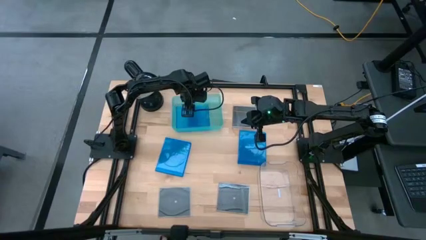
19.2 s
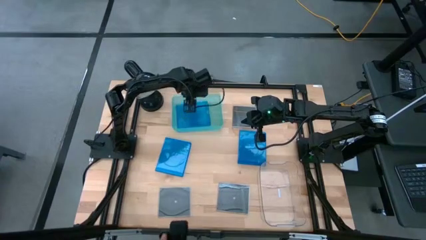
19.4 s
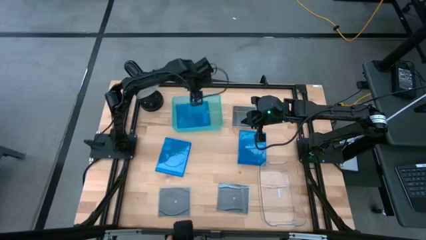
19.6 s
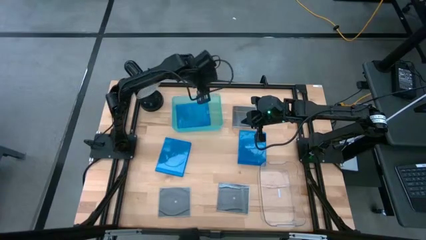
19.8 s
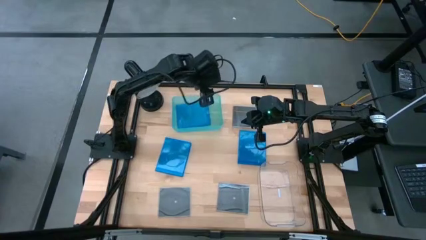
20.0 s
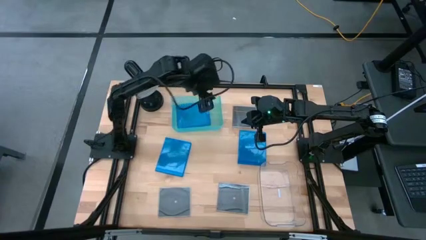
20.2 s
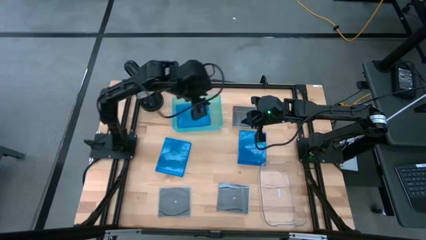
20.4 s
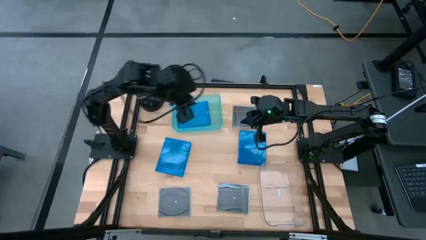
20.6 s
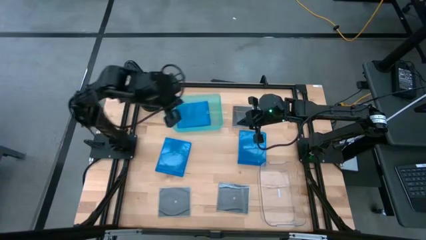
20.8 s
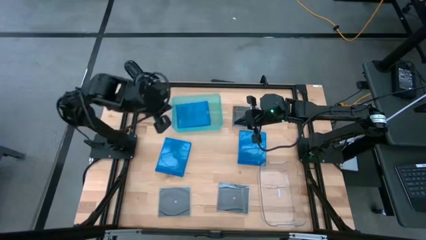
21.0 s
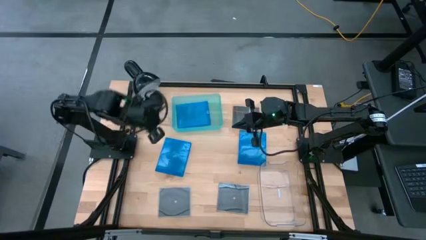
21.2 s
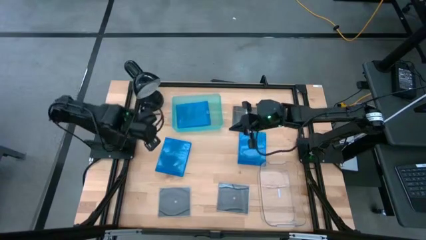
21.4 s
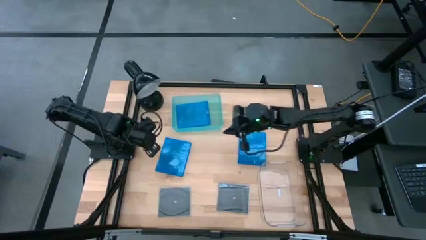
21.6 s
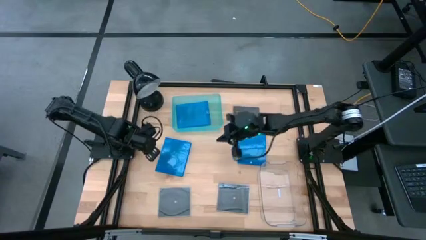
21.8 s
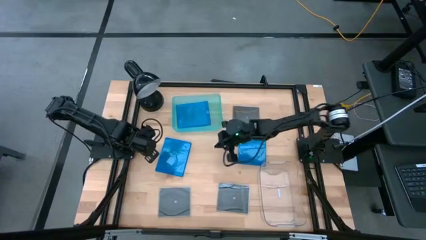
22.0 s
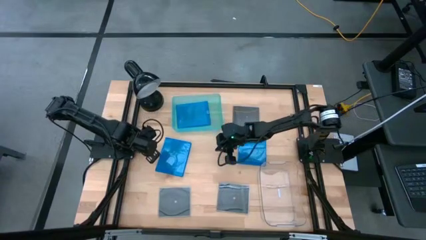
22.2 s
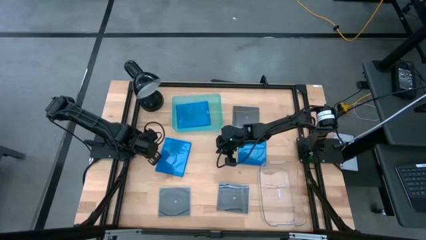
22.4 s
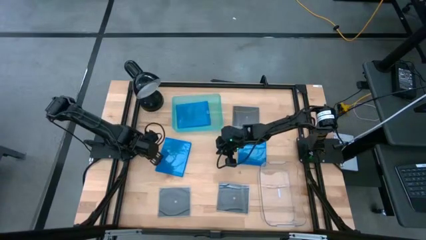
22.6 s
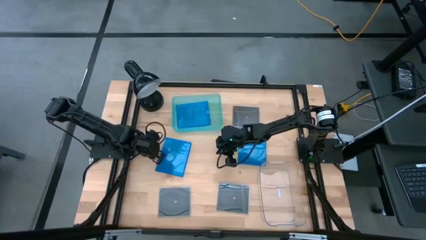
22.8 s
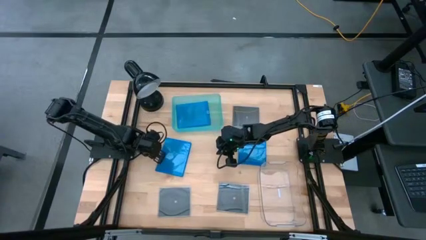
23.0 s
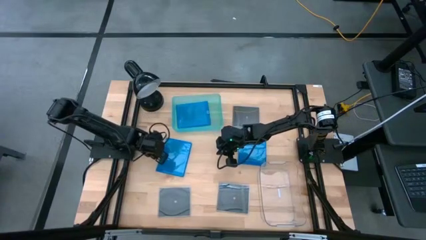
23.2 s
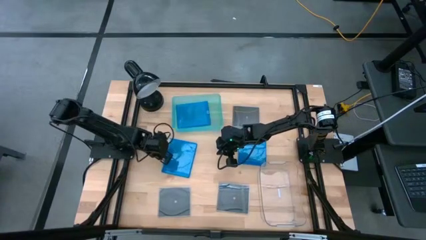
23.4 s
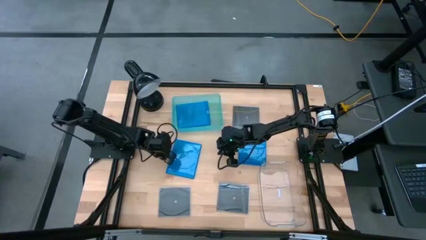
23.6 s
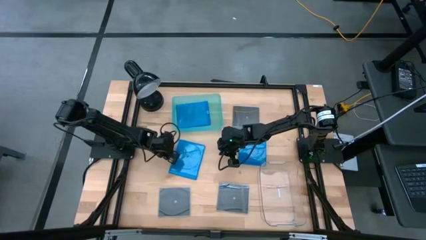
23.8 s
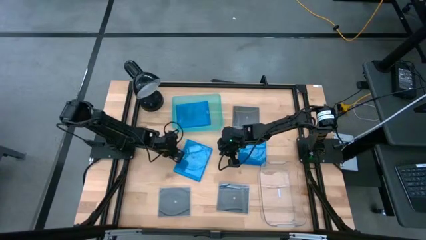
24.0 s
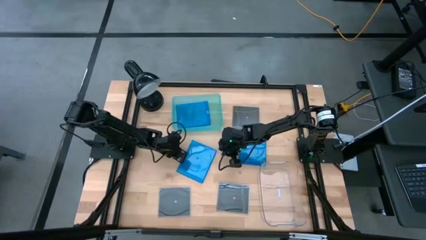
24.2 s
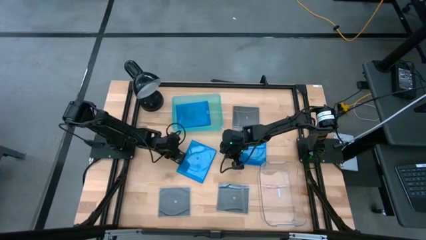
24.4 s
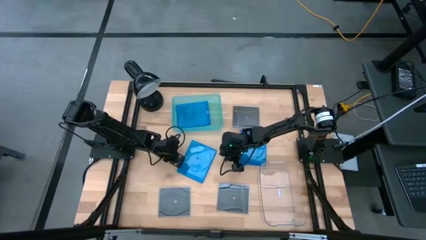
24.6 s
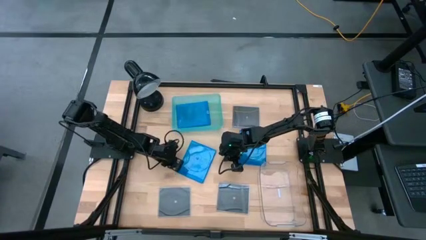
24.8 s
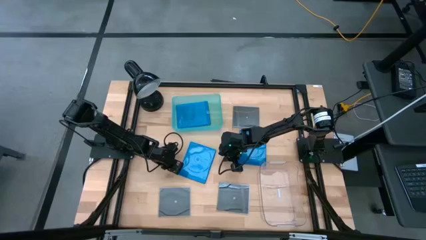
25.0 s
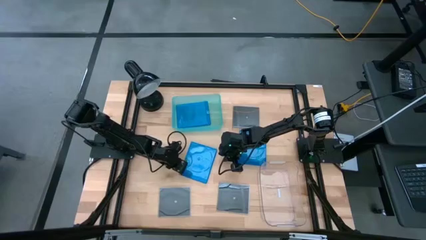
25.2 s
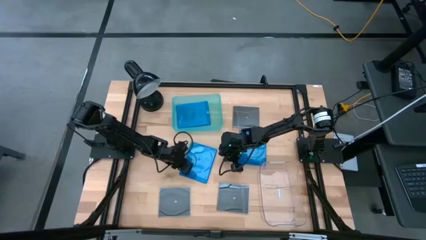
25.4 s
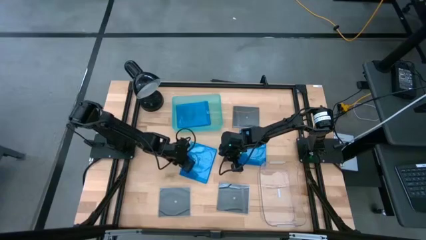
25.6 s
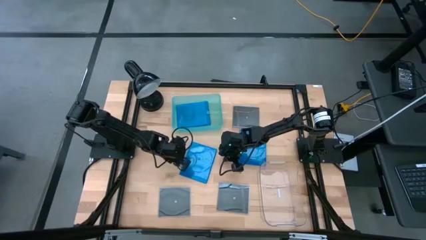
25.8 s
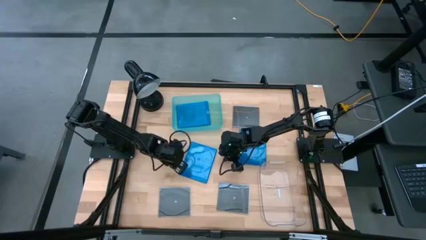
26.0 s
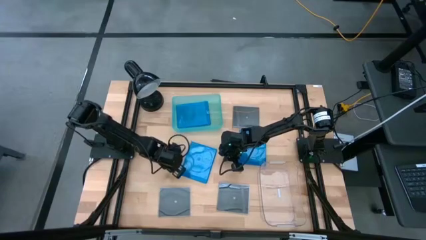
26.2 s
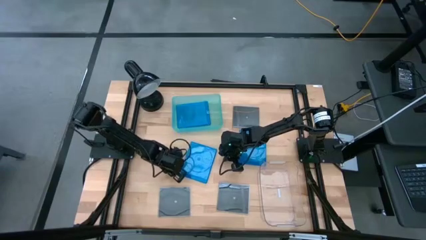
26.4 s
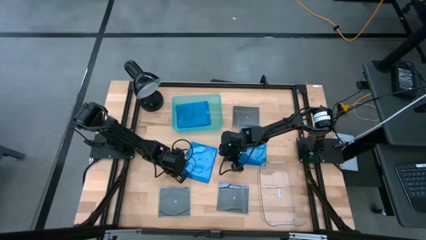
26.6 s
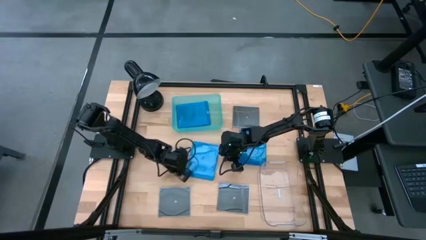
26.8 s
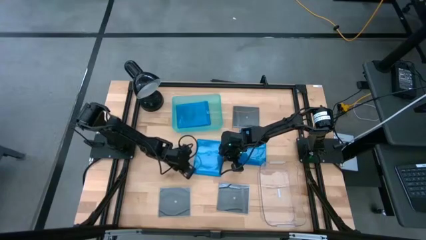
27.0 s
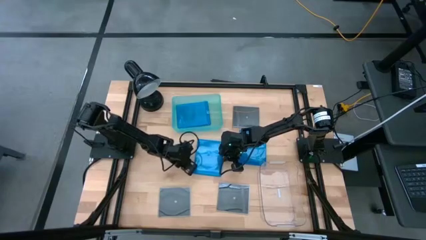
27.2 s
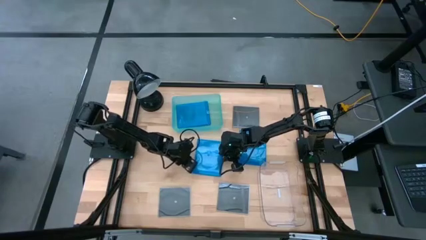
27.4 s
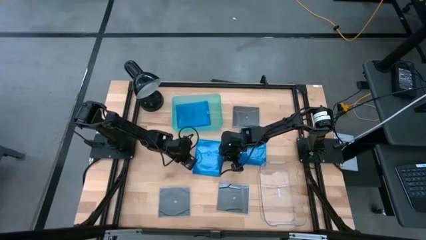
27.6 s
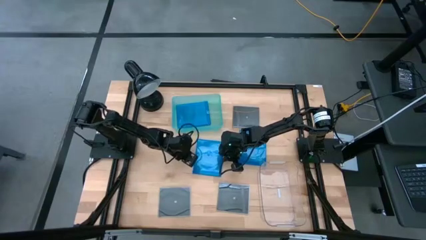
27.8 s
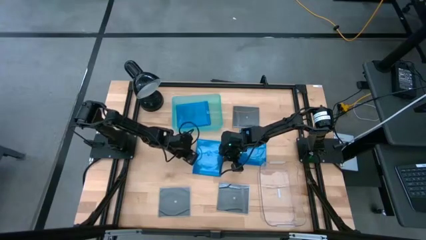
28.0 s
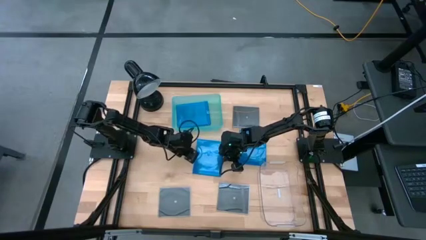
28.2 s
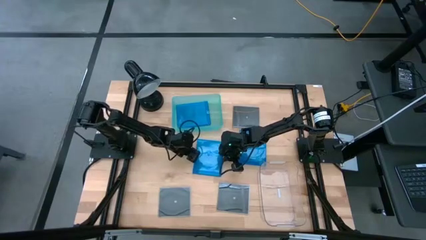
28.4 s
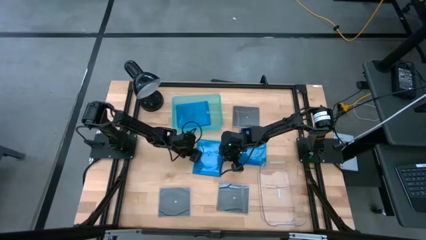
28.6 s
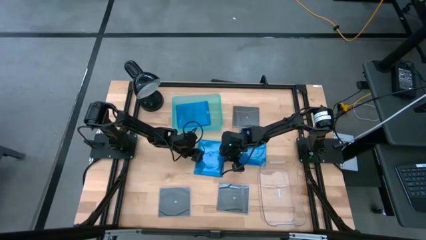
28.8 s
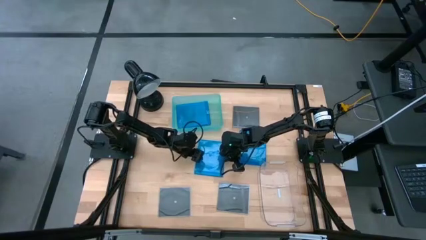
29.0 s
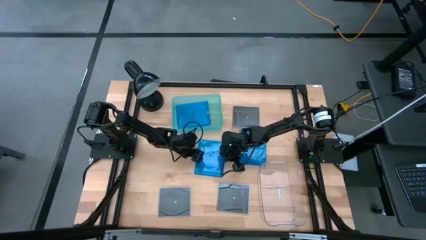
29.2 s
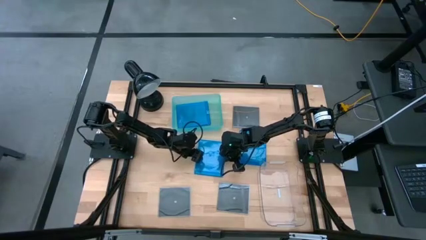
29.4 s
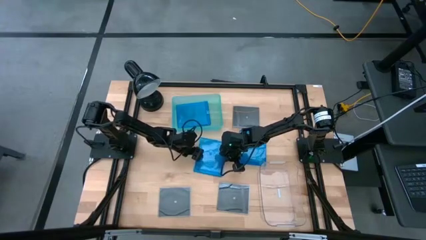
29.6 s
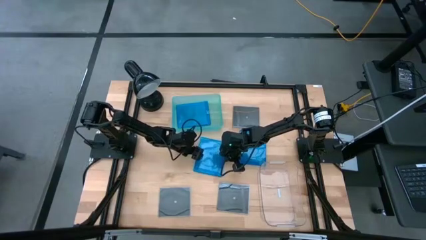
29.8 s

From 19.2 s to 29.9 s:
Task: Pick & place jewel cases by type
Put the left blue CD case into the green bin

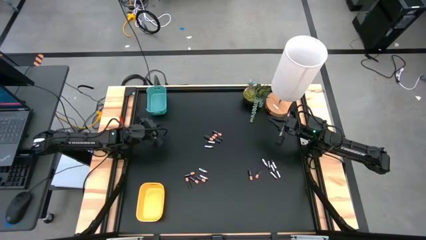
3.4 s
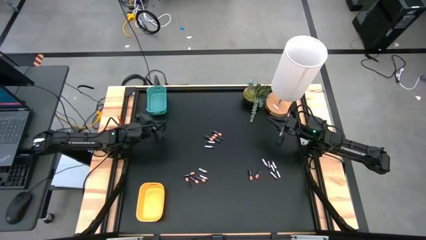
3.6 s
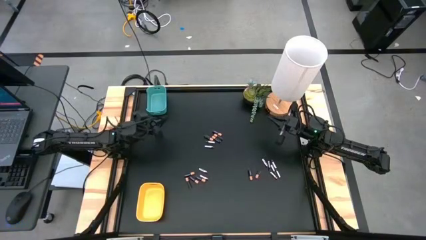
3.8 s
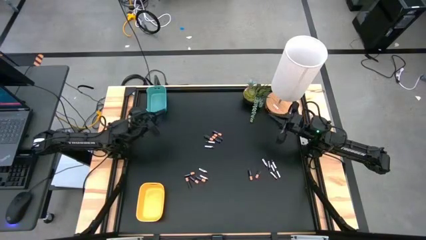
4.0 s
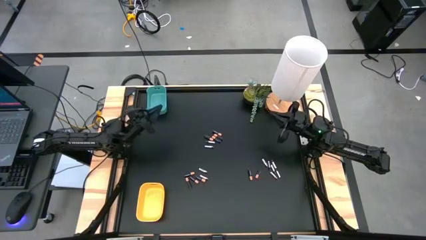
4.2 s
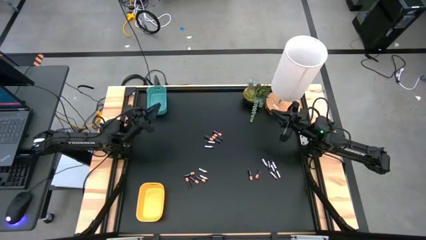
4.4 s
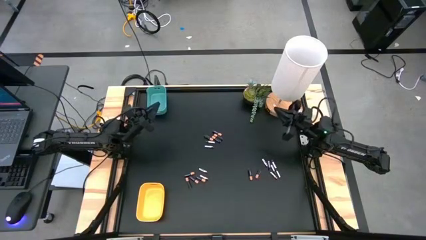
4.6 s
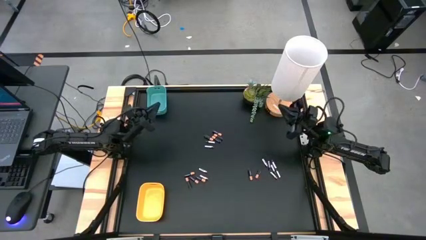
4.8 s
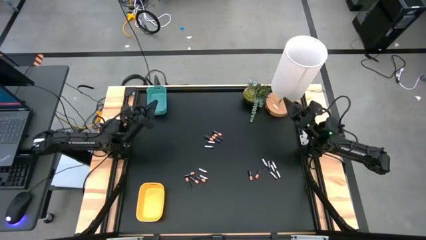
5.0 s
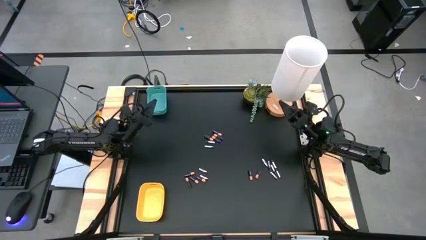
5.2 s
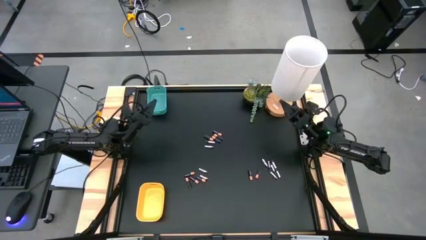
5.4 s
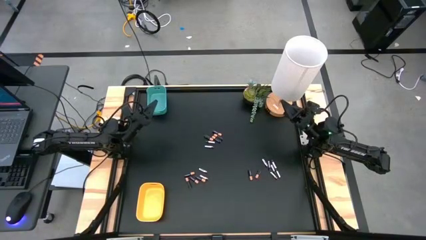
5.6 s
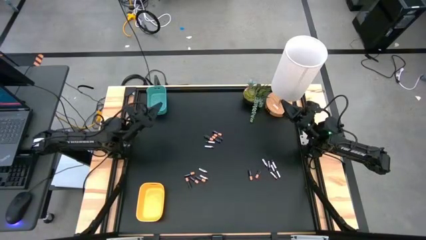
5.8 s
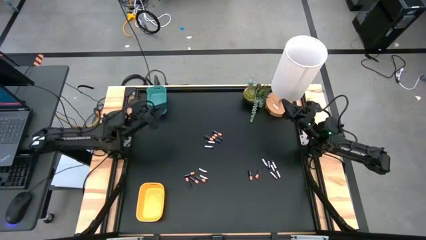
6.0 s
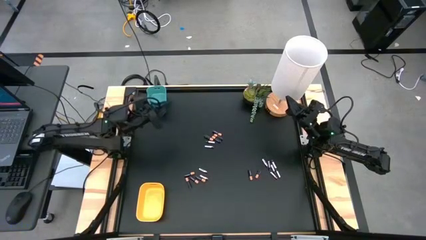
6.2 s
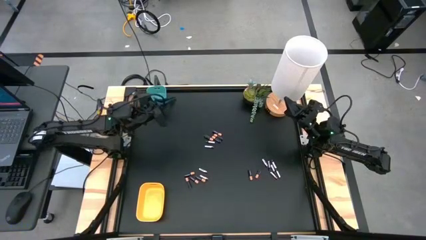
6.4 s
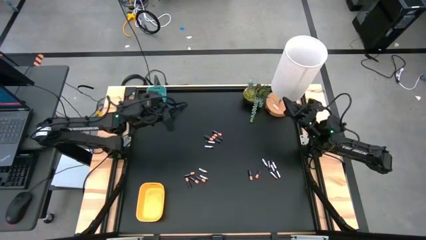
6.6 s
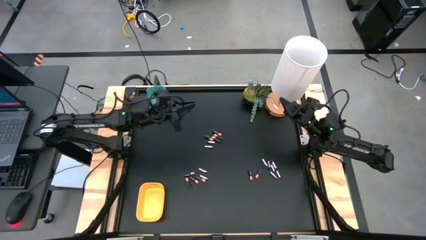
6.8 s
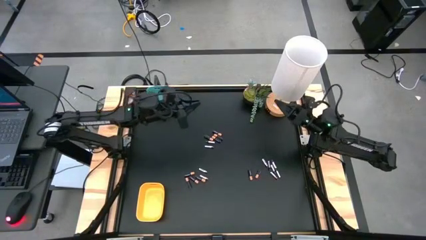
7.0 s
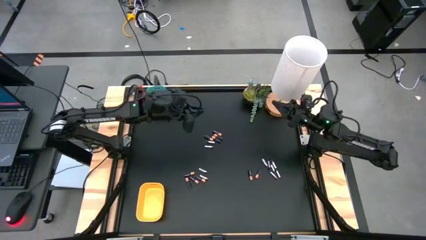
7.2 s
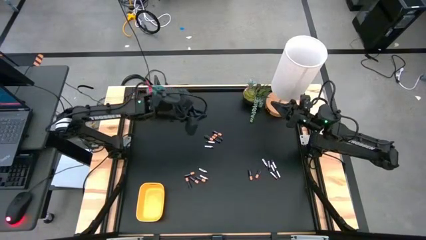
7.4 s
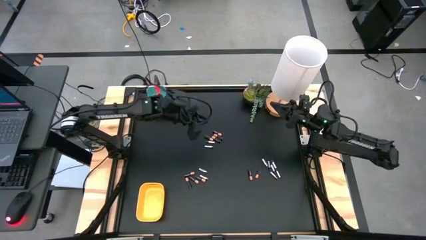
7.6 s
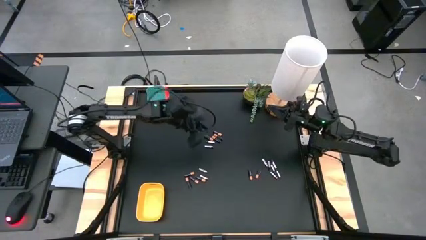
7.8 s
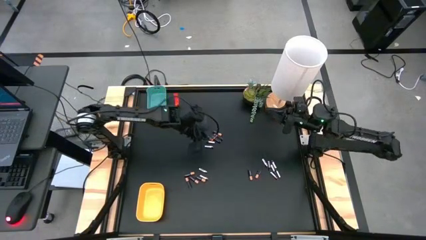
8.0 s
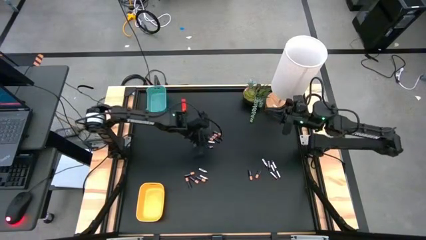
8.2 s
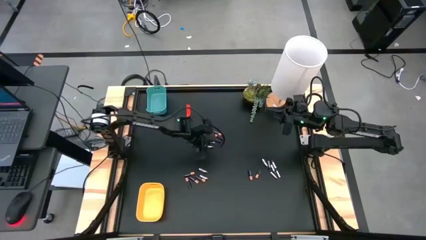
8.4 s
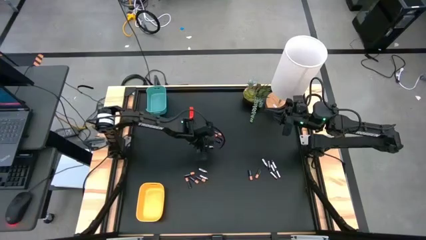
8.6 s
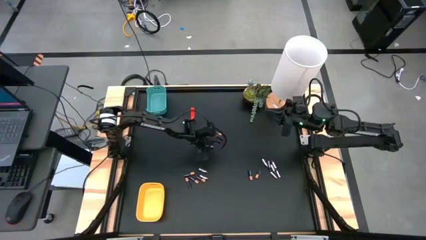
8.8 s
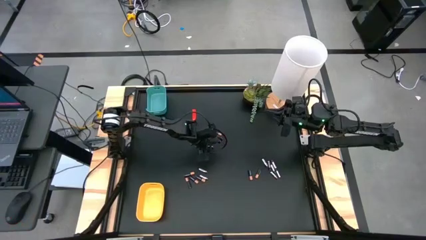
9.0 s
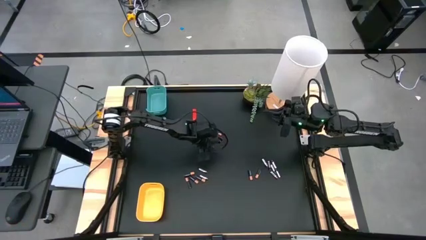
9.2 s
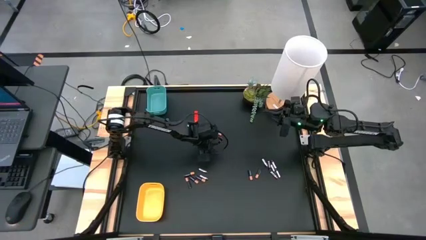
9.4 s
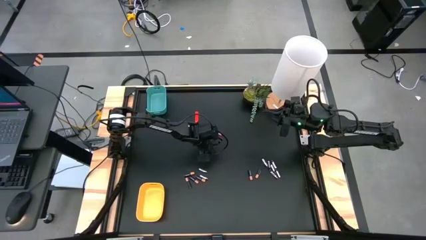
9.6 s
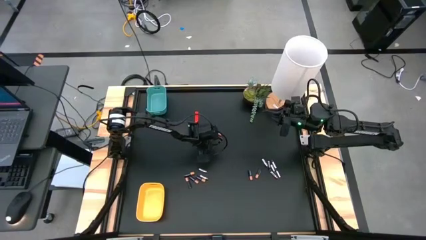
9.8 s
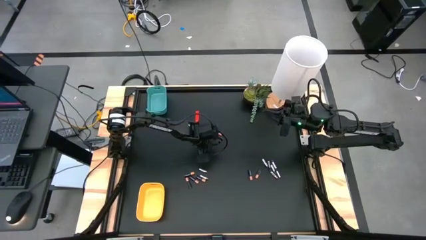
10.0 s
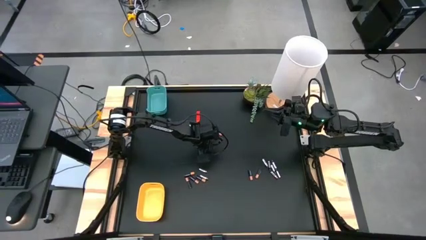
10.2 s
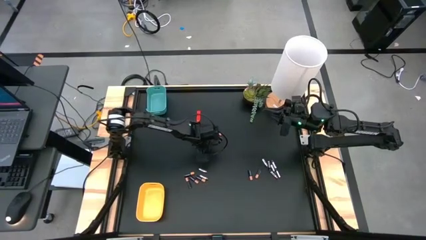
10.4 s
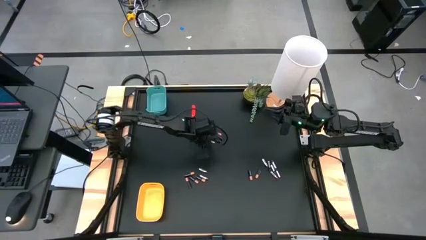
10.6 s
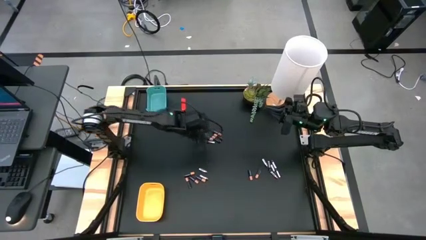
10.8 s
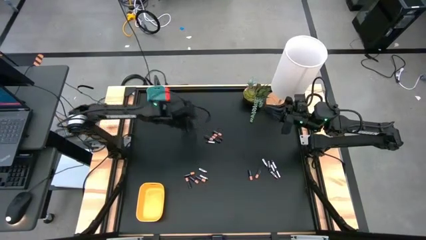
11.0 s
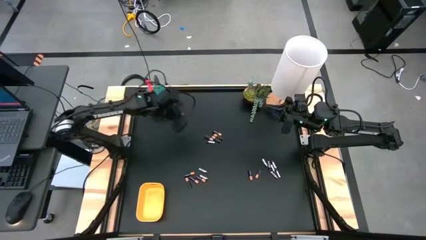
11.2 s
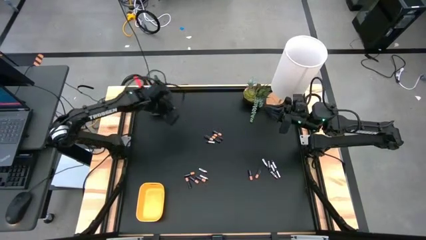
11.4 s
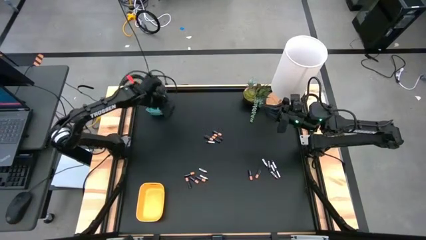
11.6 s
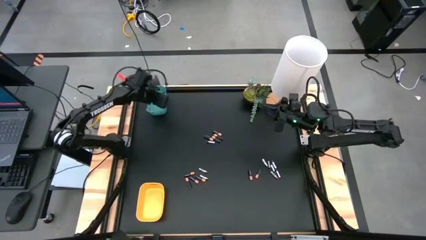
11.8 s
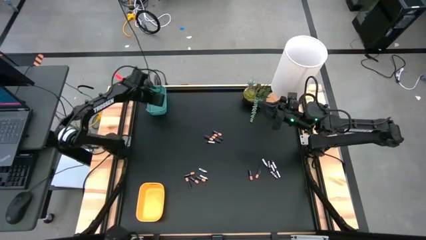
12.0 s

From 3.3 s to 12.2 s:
Task: Sort batteries
Put the silver battery into the blue bin
